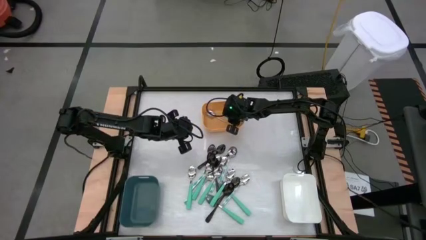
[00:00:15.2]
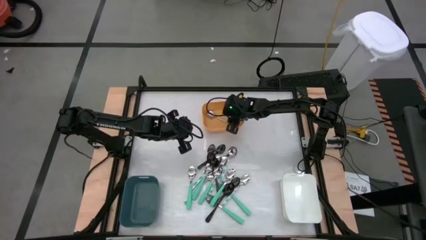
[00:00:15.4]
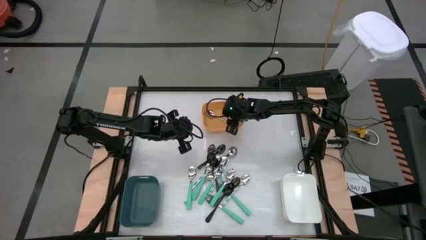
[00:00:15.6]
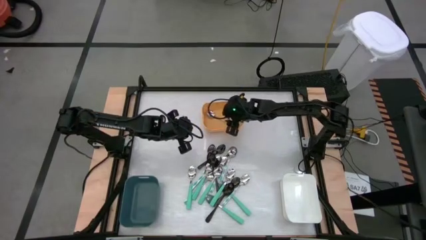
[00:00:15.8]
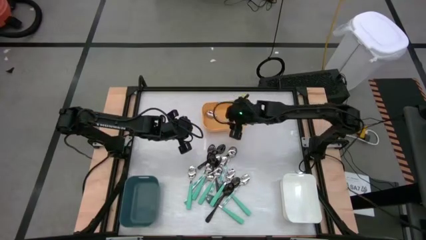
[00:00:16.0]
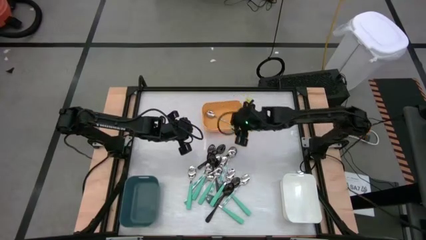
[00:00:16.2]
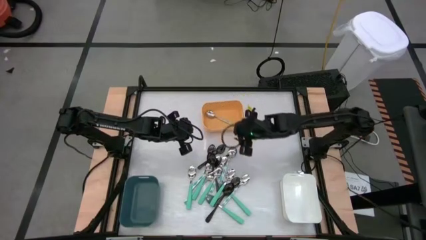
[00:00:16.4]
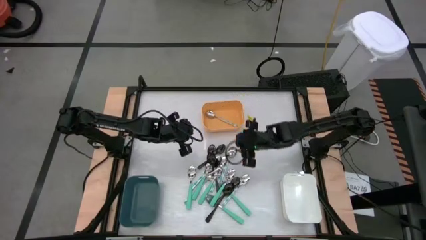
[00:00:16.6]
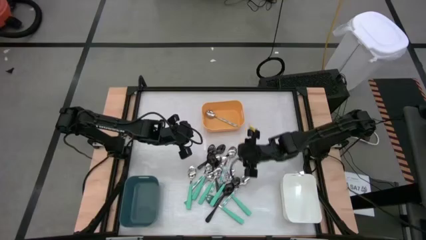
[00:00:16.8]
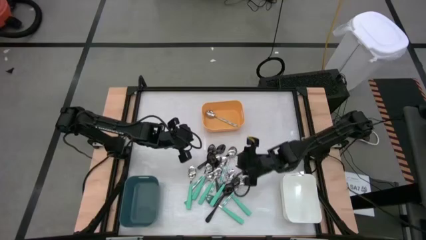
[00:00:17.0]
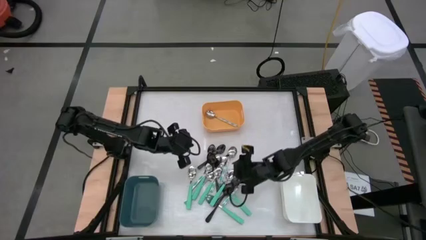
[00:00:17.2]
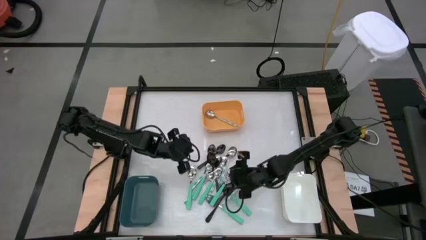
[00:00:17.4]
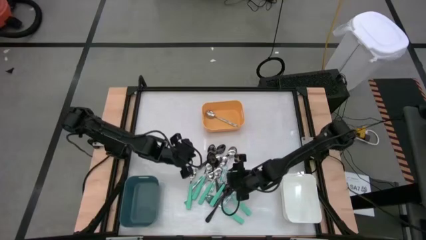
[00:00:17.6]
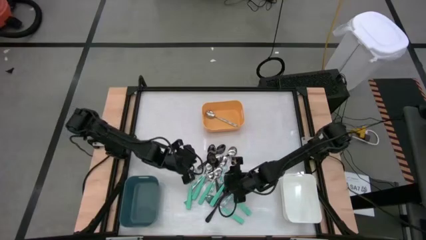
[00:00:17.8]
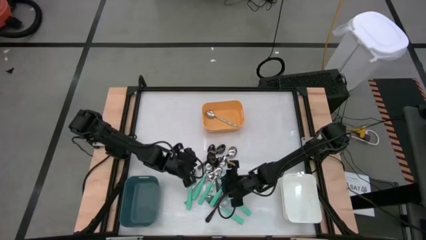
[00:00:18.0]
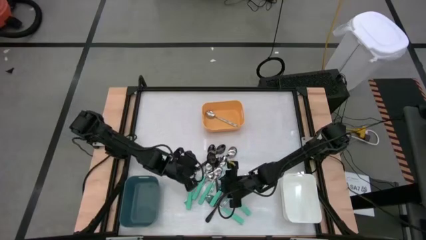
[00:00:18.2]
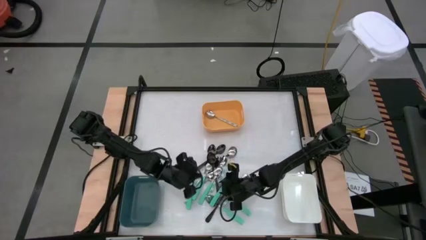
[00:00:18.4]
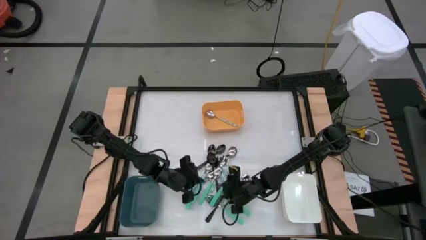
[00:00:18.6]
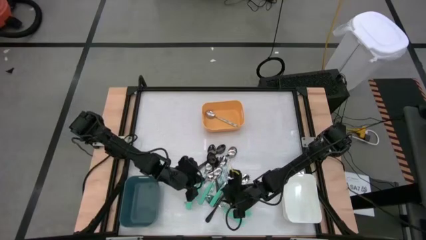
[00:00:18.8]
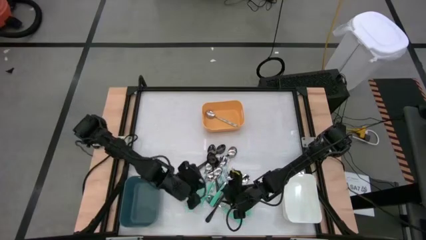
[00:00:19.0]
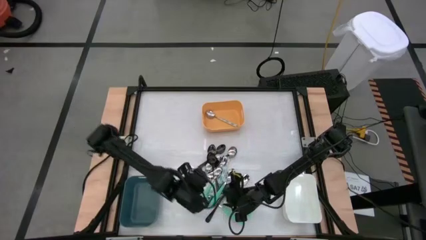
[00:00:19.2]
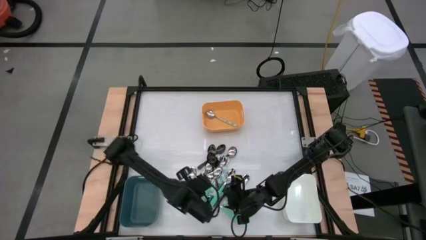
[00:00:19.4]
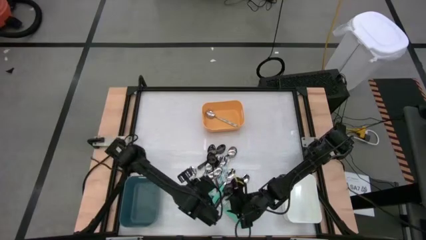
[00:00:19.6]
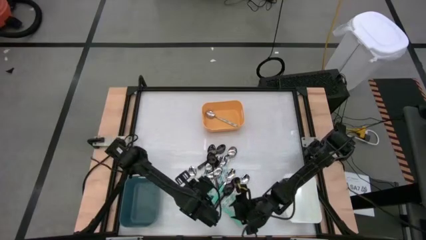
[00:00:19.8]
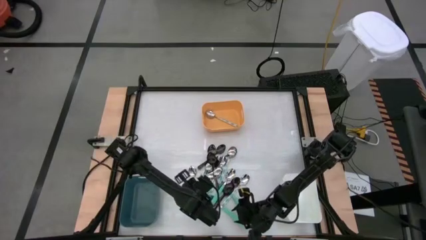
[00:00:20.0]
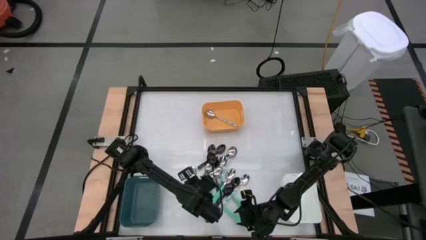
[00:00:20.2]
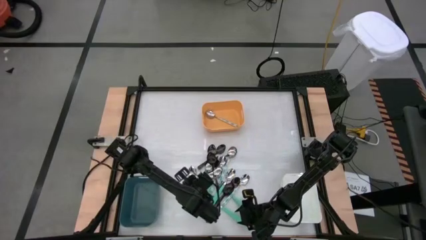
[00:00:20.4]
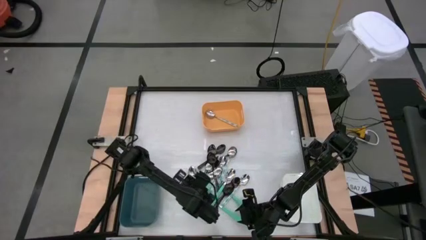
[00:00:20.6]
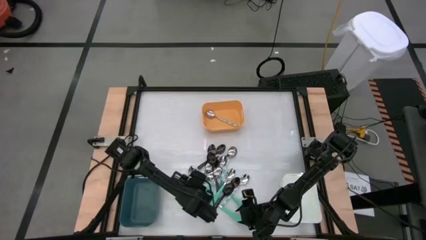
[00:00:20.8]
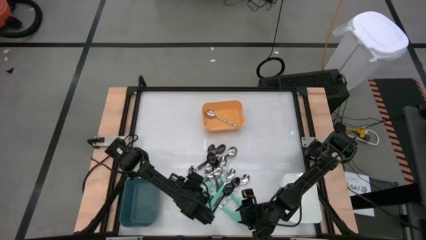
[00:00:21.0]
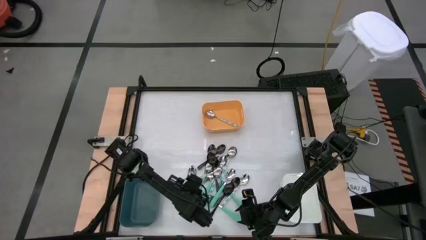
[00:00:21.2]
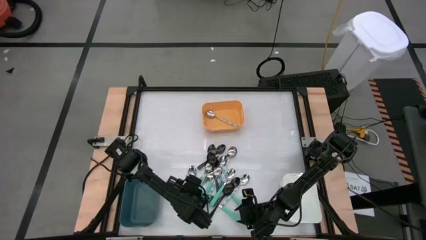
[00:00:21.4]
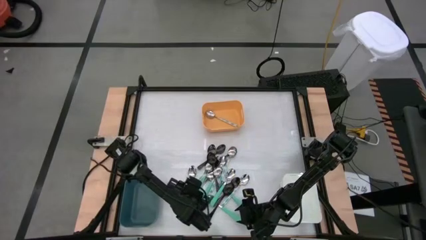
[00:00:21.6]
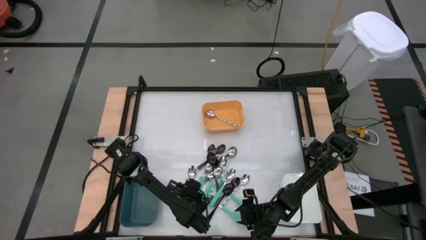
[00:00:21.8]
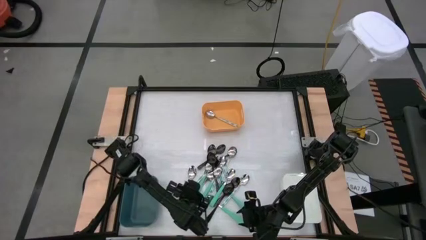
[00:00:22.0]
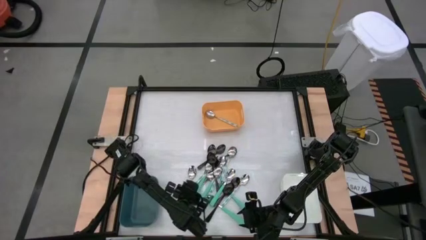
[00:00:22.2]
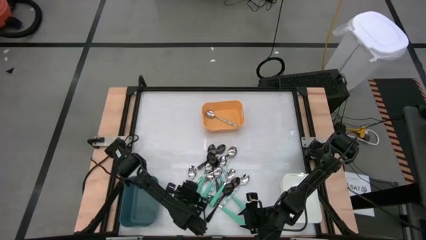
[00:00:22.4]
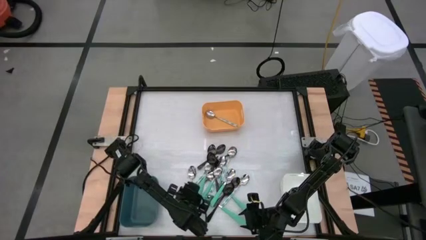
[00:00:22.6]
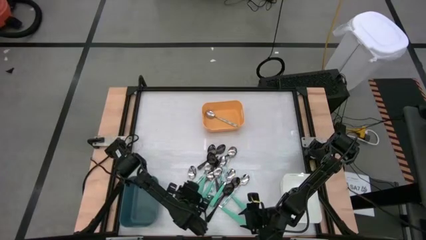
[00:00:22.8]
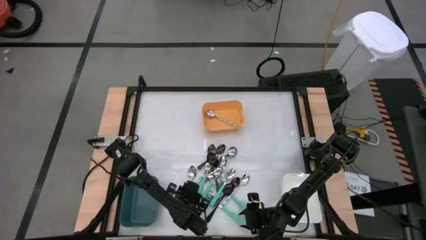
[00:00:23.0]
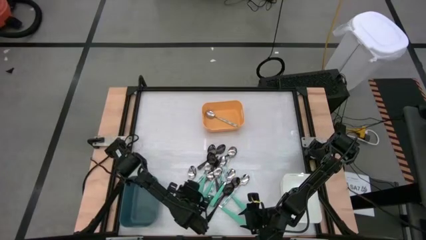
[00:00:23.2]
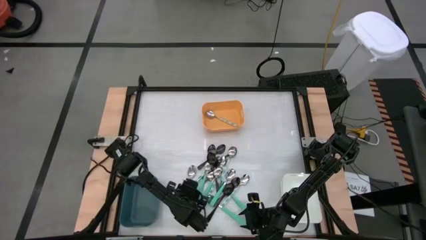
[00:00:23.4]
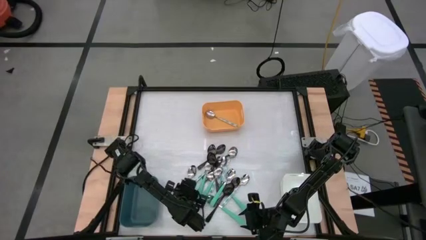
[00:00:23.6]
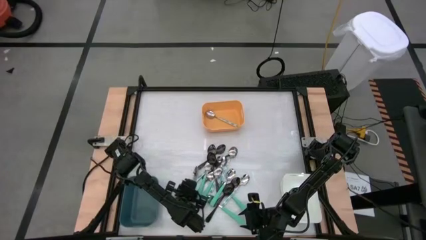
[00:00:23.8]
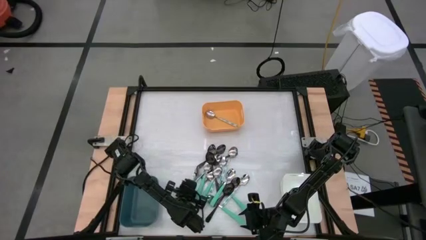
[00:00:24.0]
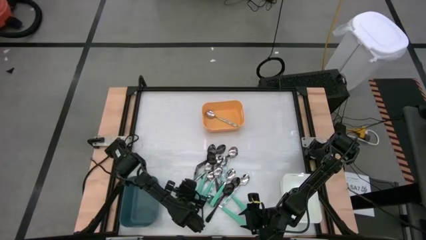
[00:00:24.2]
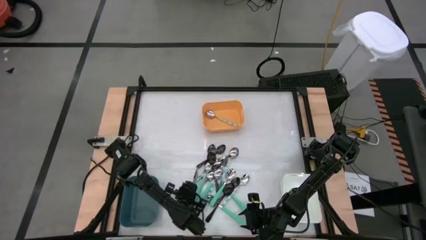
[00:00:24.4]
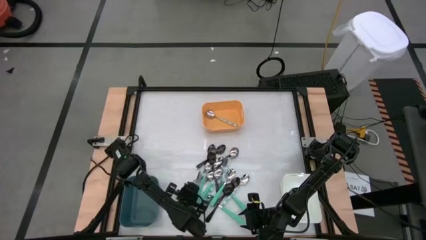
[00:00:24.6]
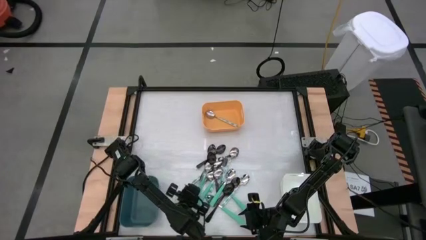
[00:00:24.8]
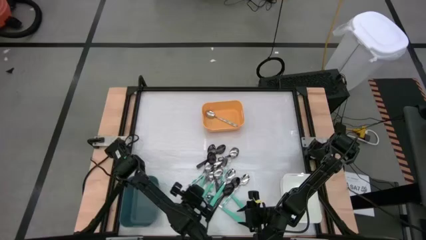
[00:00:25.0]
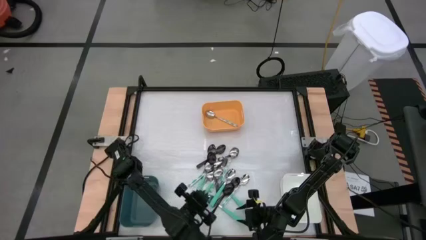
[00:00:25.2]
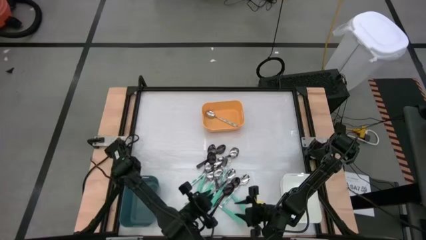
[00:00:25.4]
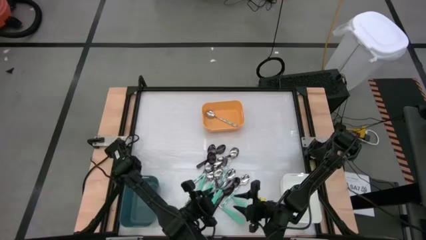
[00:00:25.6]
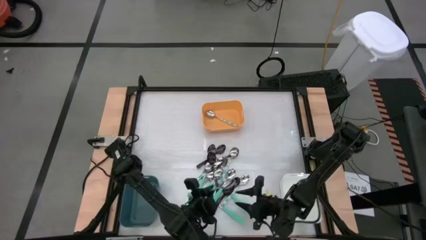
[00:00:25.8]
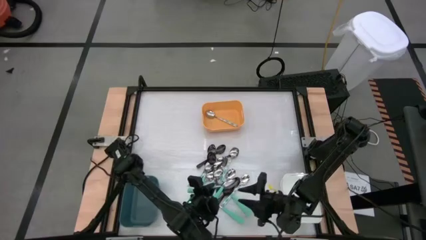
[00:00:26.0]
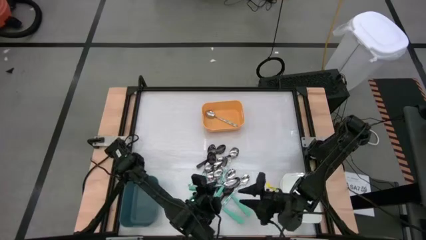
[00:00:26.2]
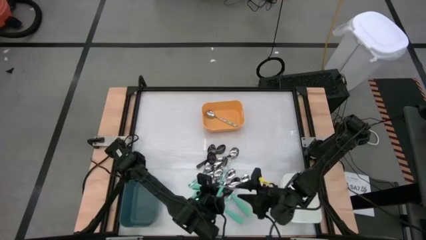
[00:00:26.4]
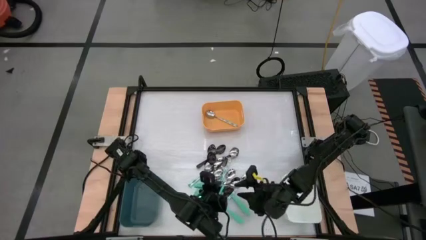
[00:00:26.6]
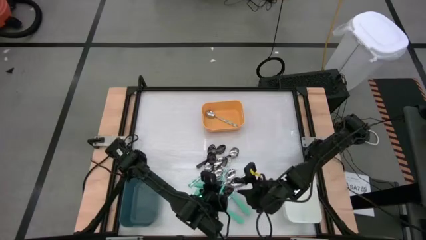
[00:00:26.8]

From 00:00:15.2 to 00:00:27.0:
Task: Sort silverware by color (type)
Put the green spoon into the blue bin
